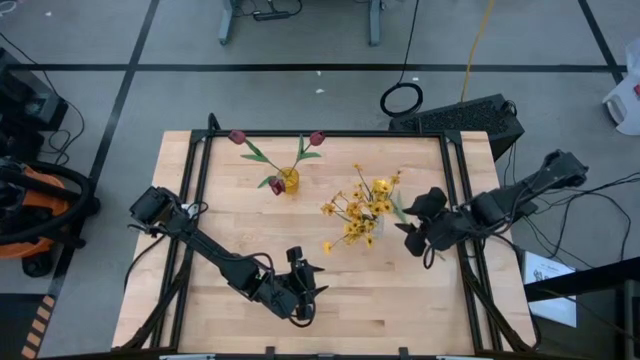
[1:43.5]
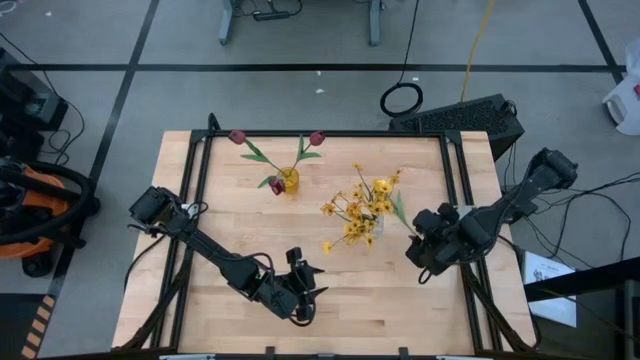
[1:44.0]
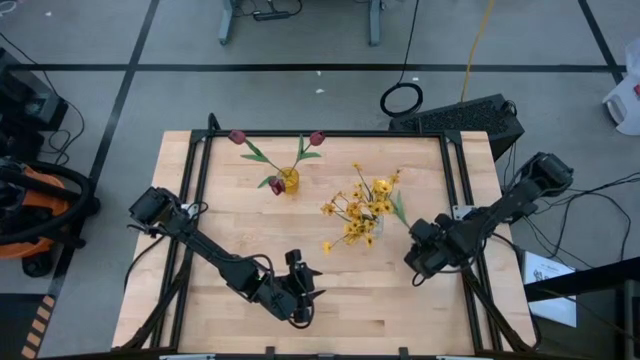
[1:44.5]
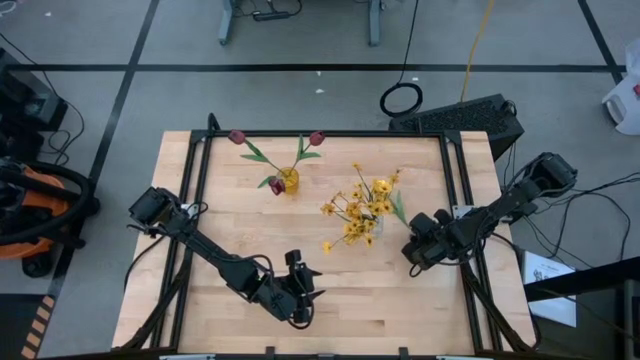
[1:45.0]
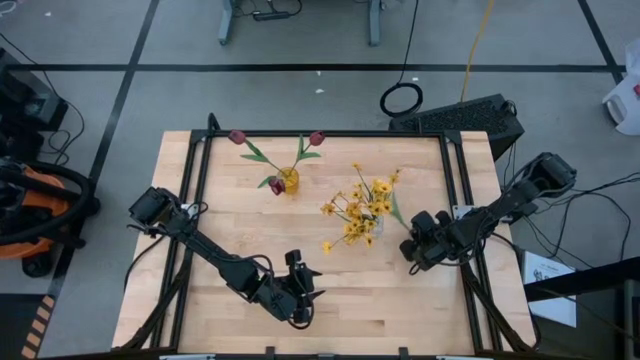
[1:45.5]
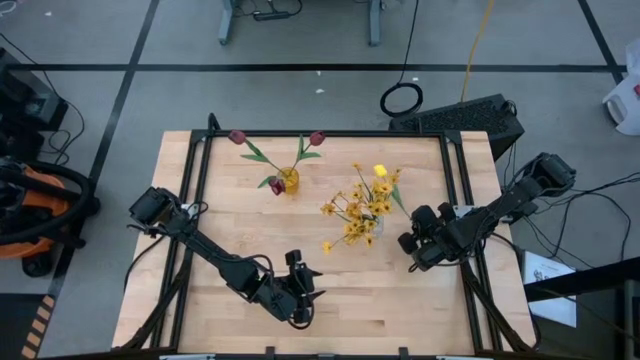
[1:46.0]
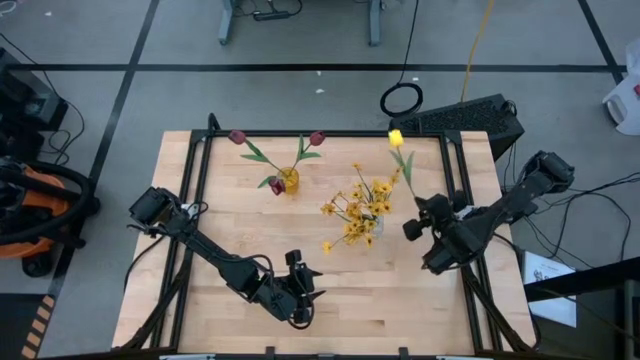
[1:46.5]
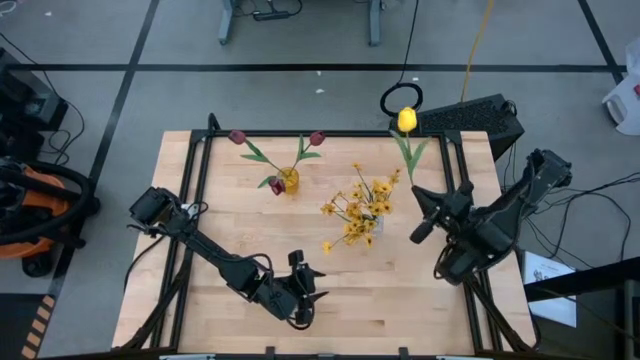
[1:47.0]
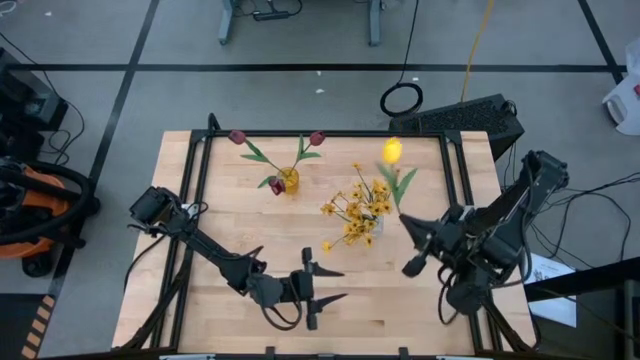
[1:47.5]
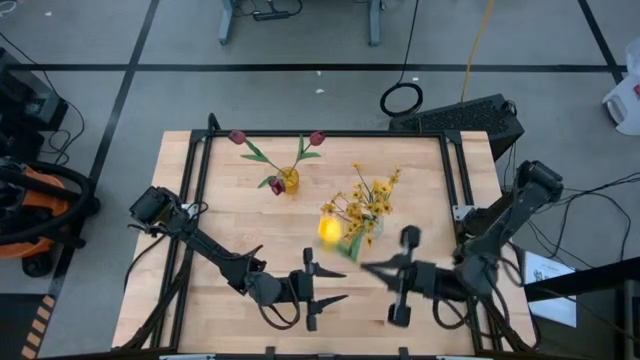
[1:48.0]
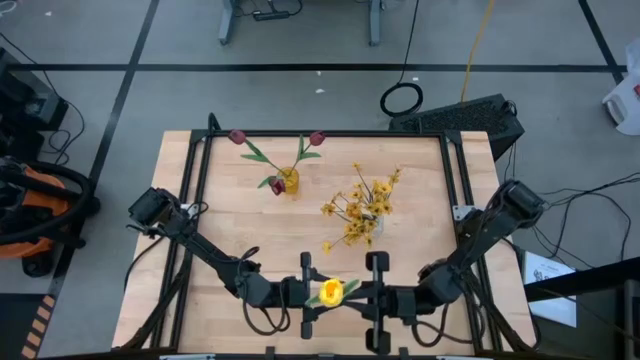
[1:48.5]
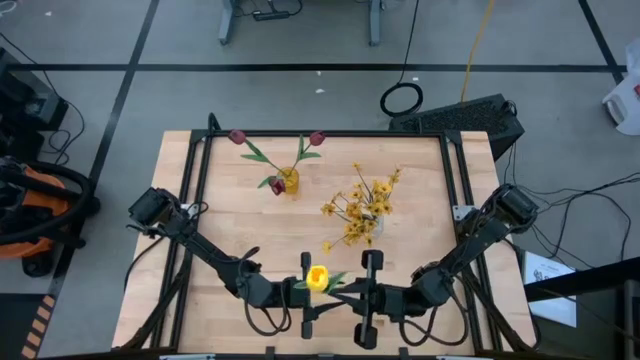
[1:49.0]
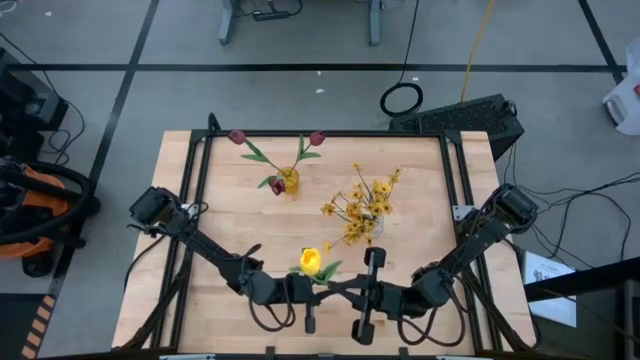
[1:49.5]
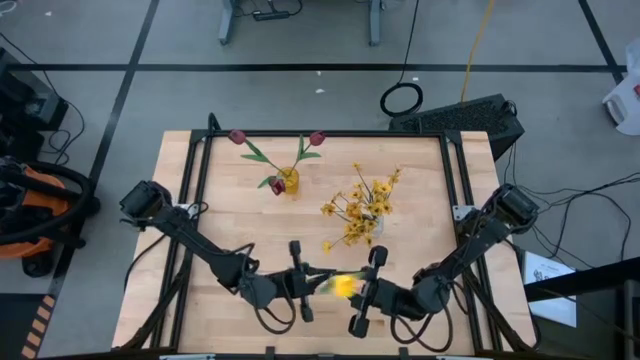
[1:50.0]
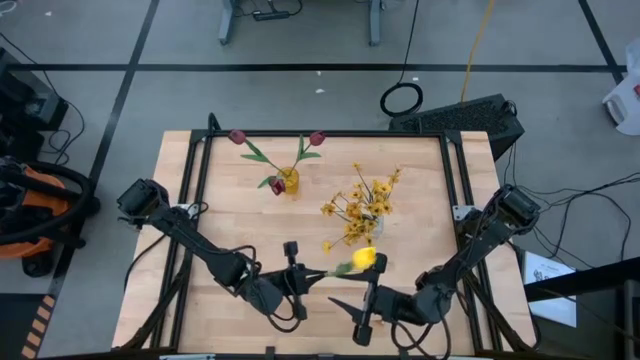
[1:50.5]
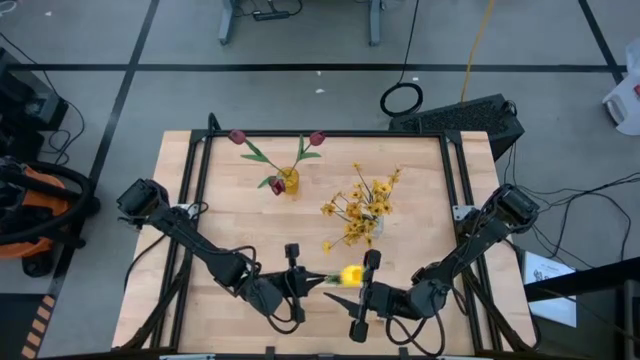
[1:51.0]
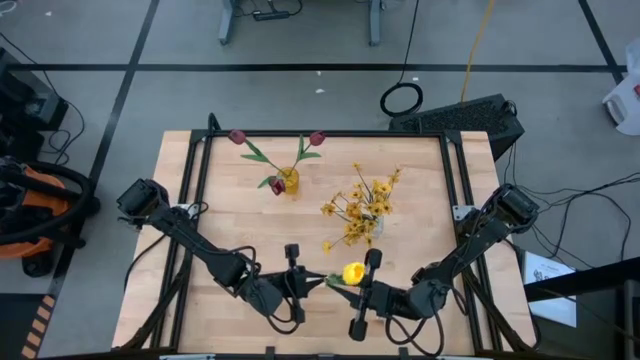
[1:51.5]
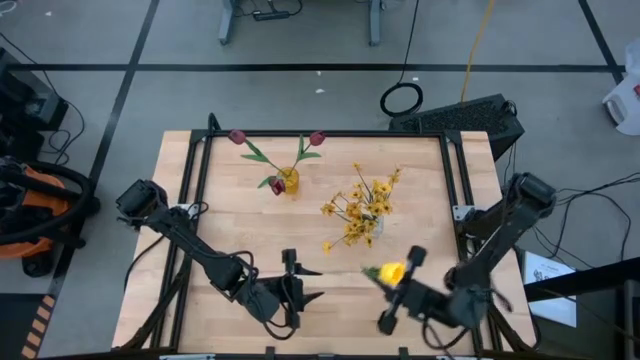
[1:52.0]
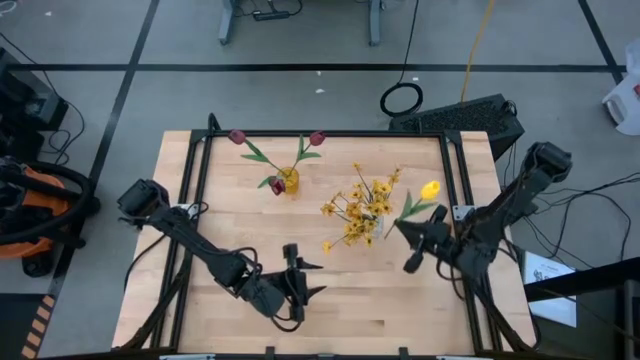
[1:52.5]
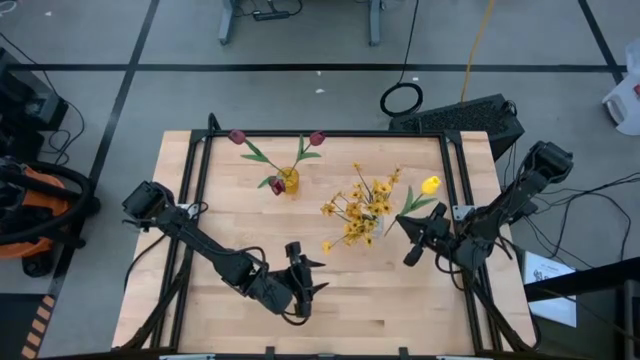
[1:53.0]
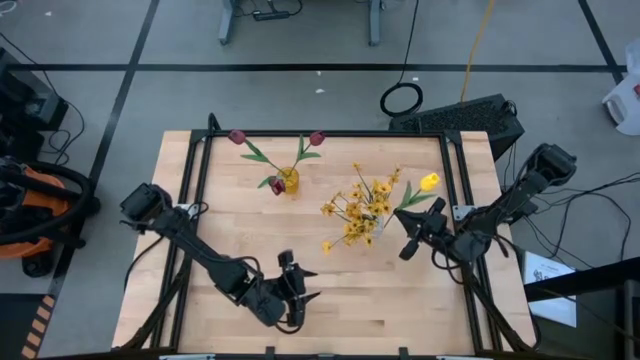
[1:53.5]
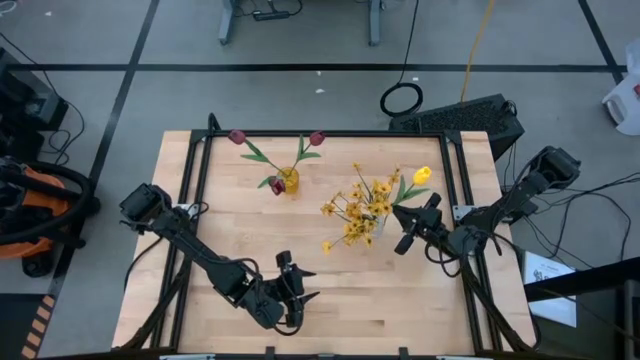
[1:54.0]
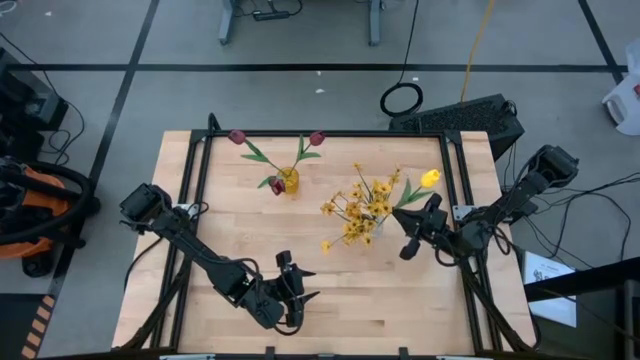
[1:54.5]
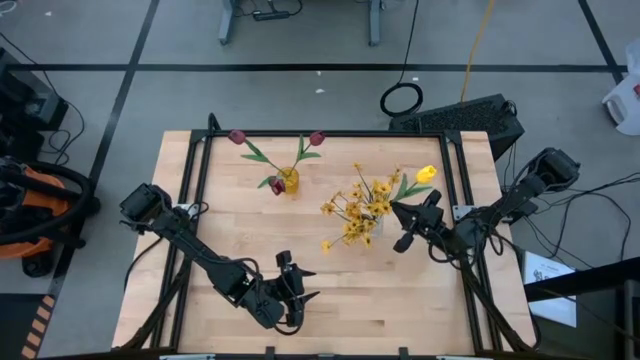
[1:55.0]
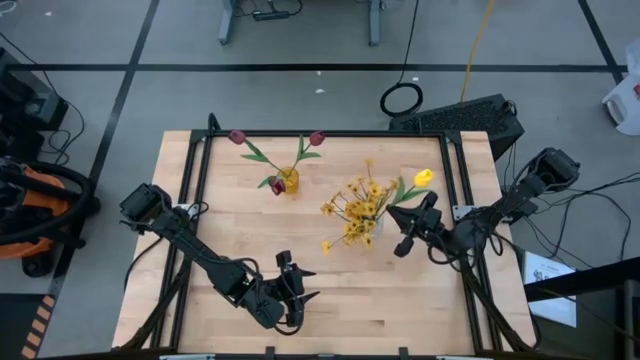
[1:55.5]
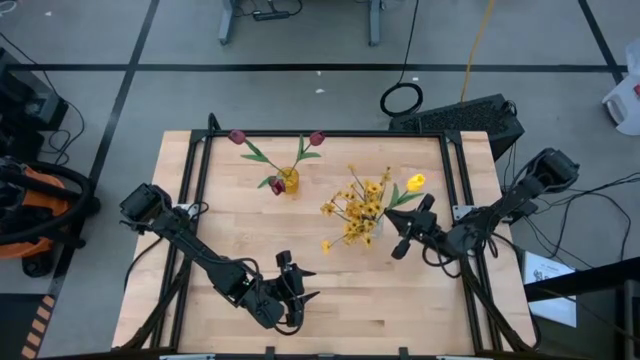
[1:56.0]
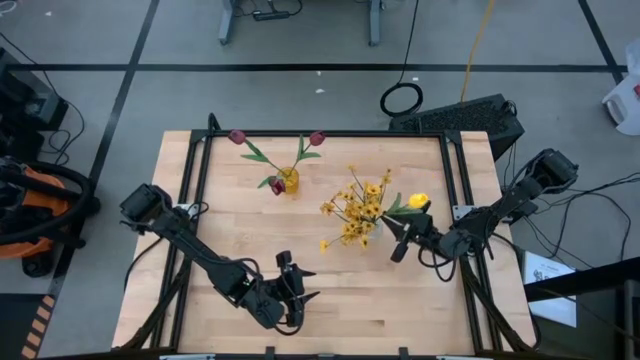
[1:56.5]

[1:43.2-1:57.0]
Task: Sort flowers into vase by color
Put the yellow flower into the transparent vase
